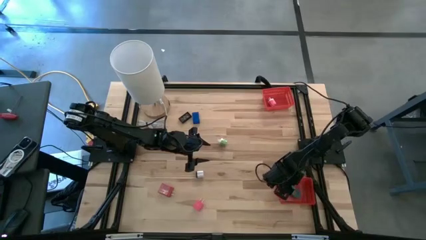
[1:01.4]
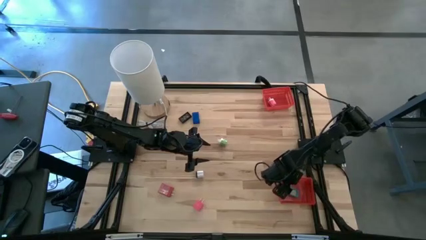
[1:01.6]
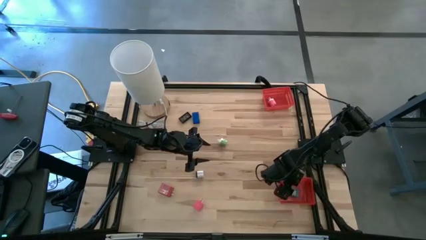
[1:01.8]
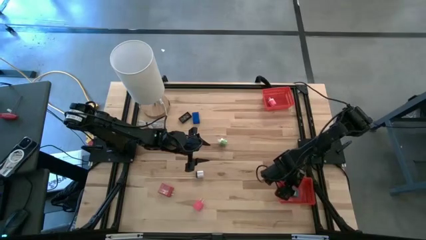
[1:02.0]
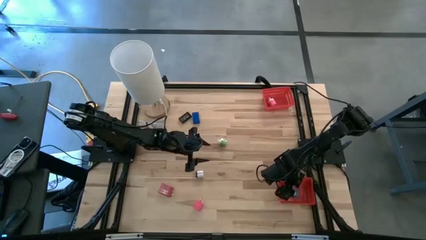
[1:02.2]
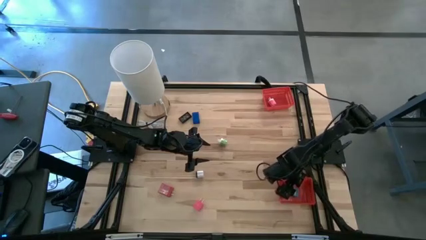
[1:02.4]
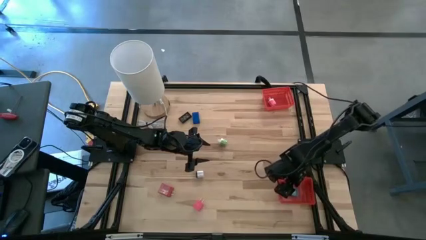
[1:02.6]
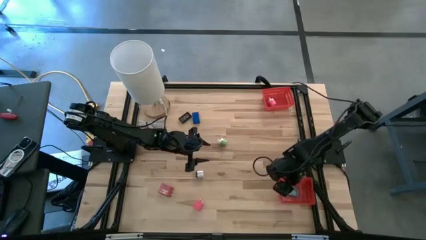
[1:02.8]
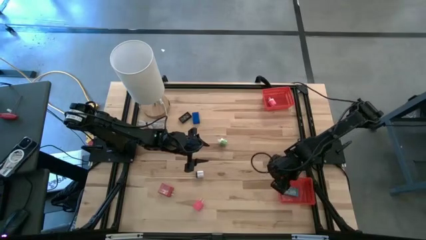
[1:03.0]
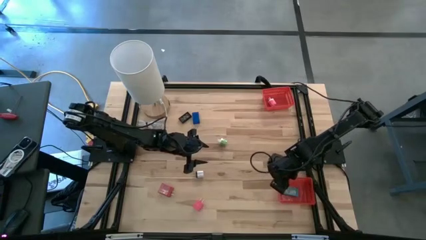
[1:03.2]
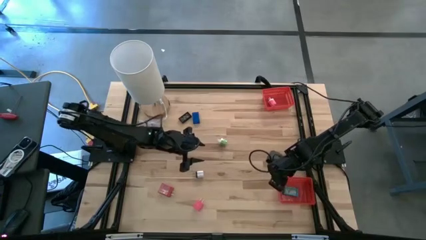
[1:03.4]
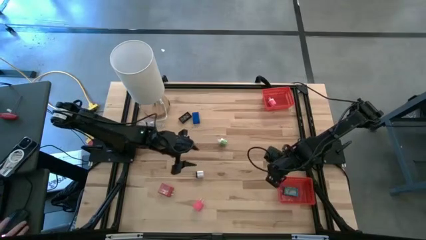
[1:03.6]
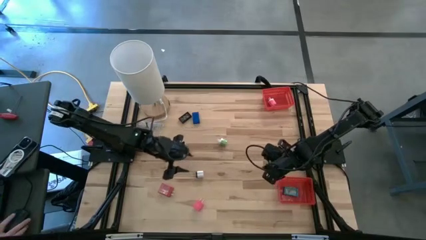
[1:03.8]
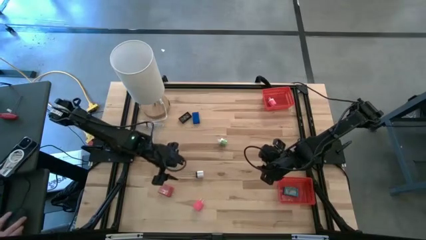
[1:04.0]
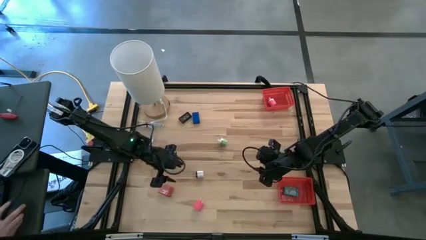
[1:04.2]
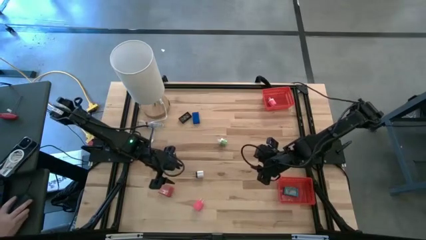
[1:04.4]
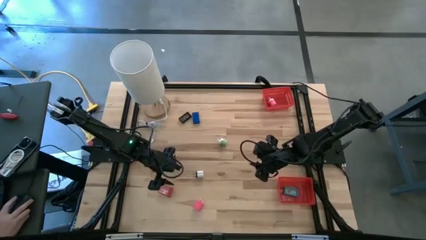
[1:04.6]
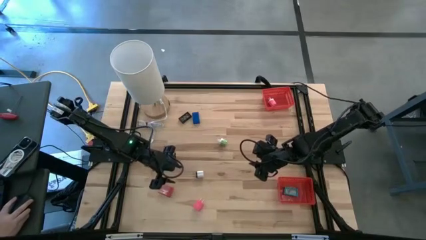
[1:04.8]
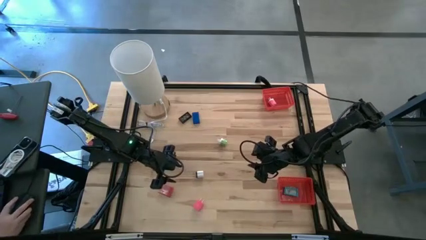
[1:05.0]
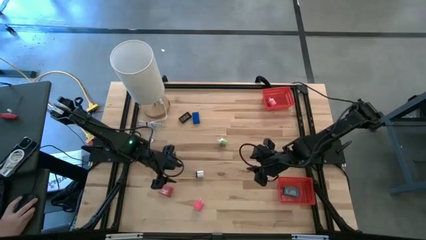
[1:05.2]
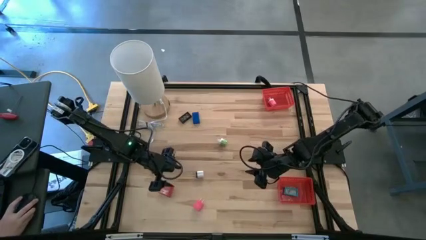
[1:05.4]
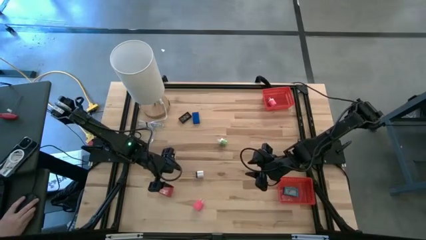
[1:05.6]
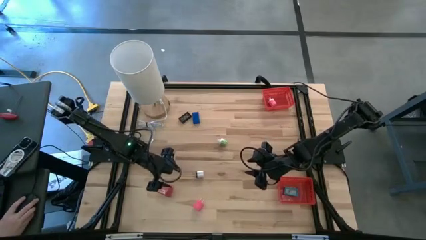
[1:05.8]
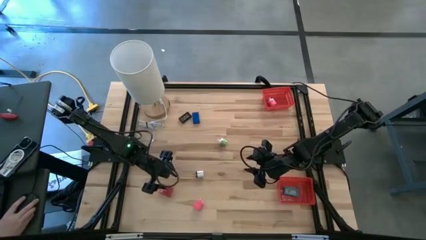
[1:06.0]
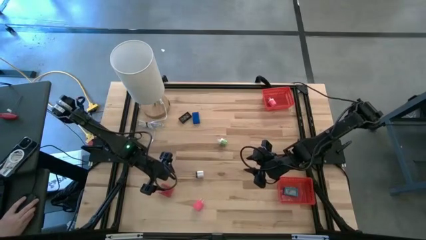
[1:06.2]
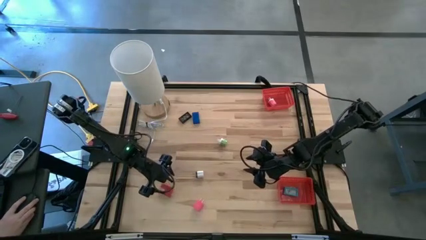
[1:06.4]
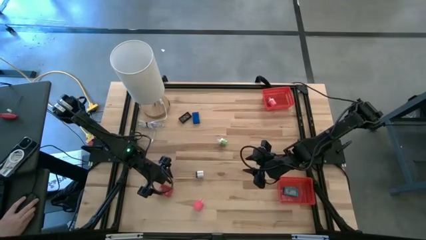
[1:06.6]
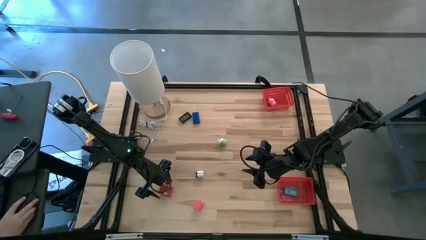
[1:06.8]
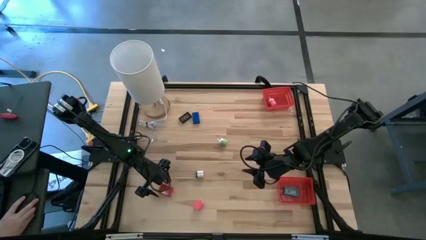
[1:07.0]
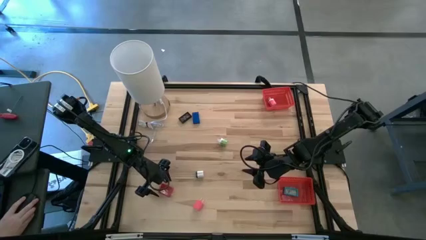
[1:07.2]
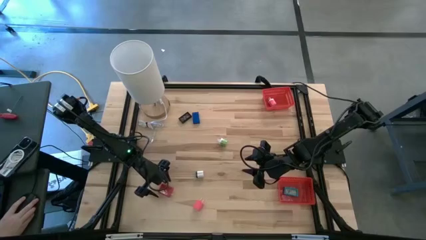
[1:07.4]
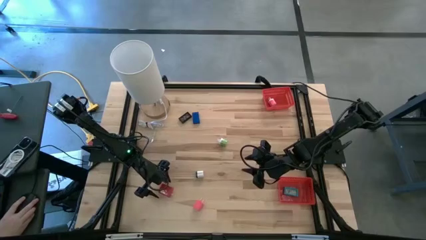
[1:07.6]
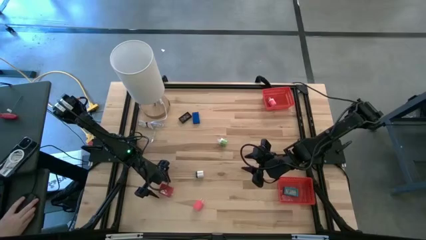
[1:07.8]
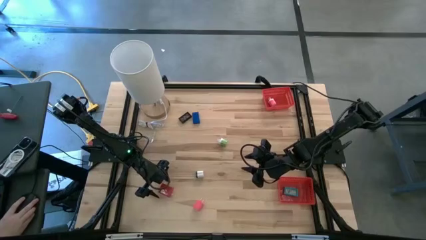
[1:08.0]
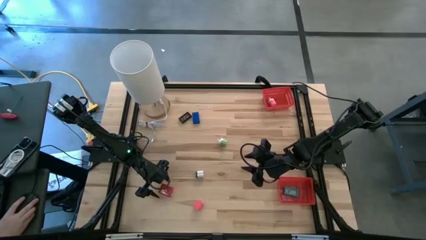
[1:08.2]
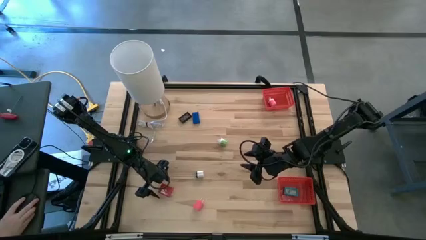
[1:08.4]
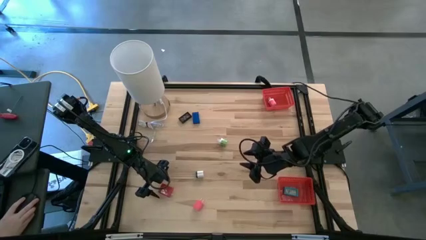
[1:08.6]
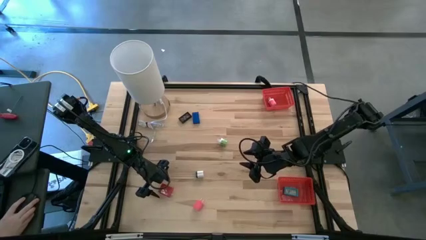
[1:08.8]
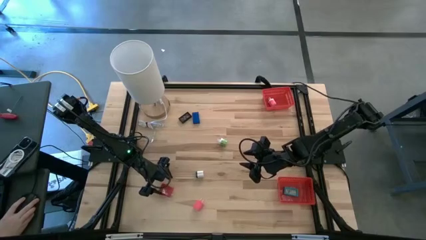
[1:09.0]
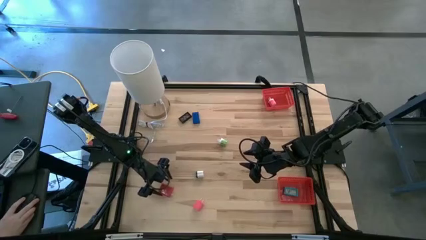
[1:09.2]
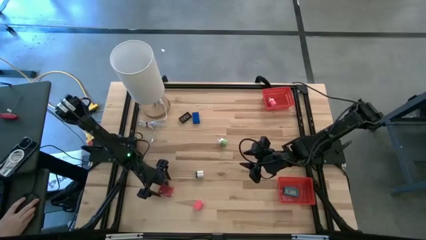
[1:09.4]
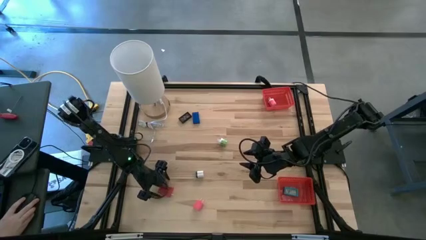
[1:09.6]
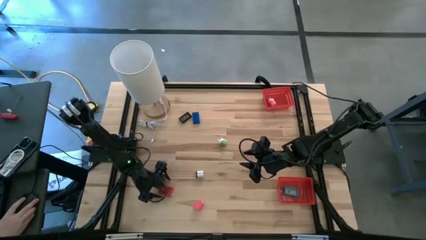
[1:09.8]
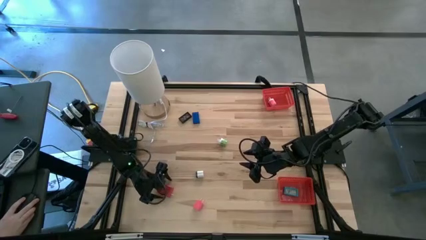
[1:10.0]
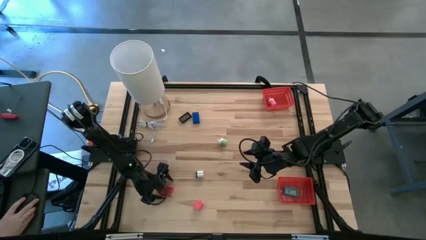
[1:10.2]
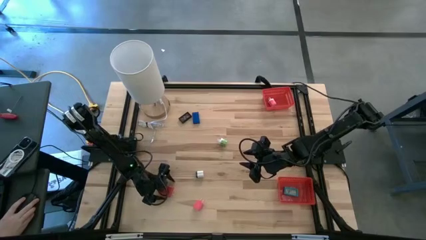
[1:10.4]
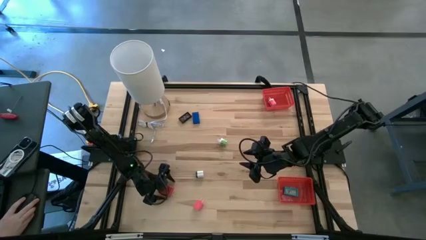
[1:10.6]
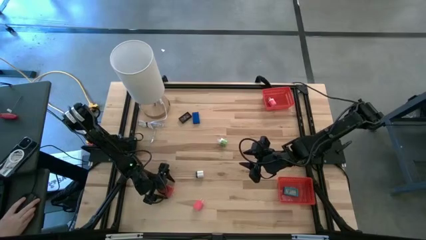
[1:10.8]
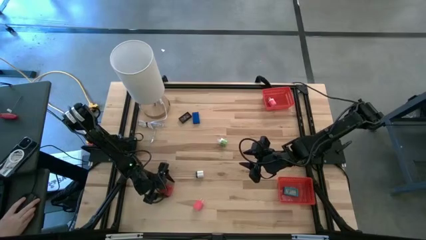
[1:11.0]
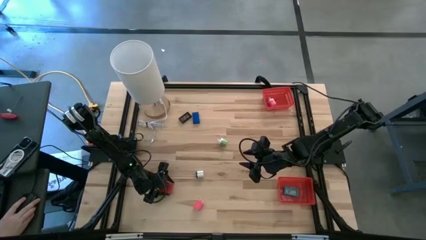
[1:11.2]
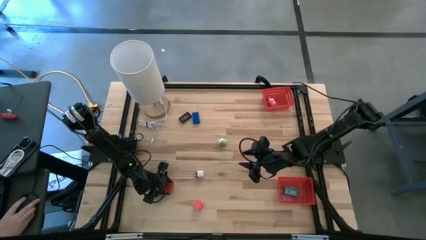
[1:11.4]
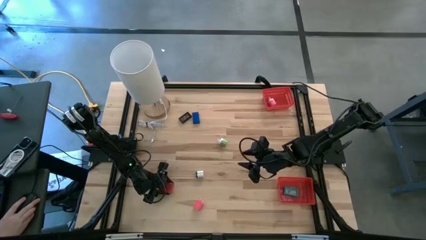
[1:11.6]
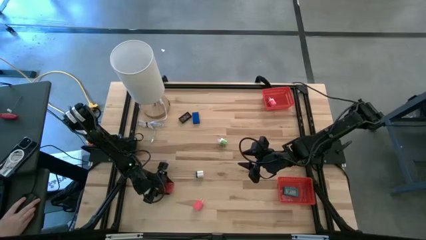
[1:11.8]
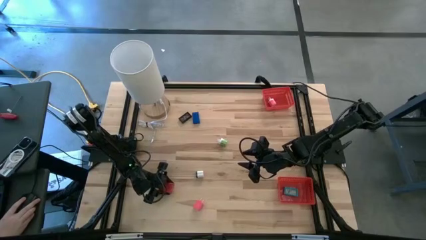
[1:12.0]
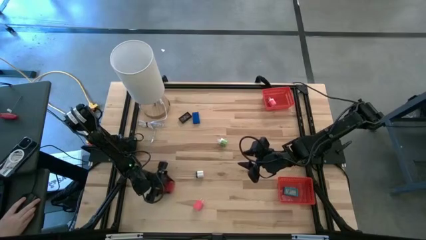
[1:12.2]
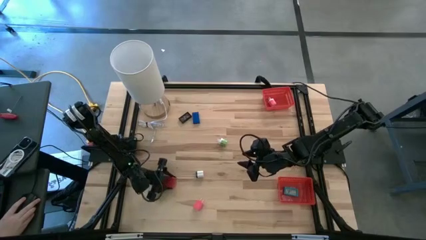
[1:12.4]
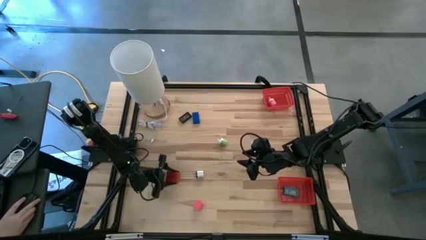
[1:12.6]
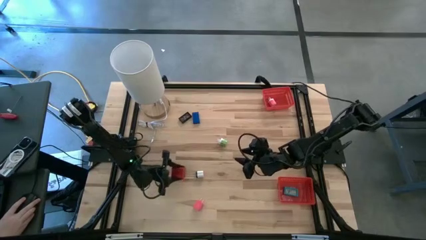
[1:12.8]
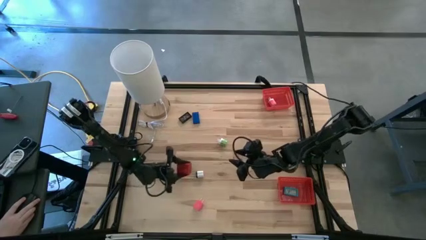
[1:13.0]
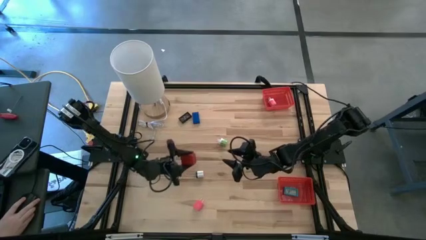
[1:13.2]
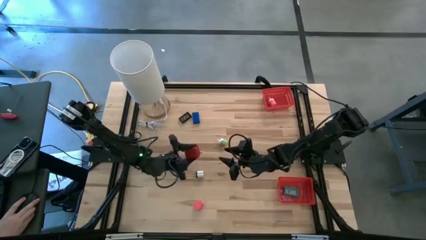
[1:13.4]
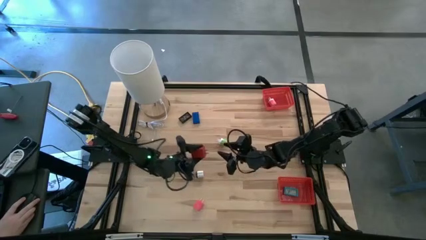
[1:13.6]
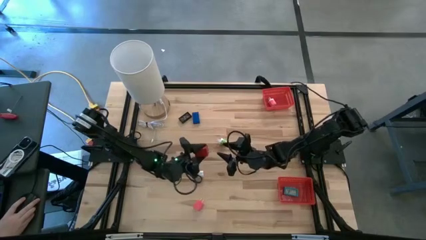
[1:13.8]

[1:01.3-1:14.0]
Task: Pick & Place Office items
Put the red charger adapter into the top red basket
